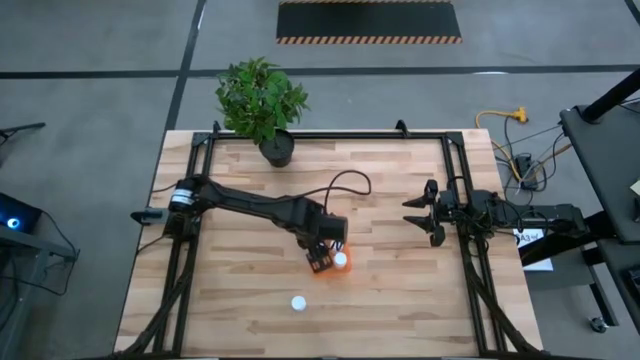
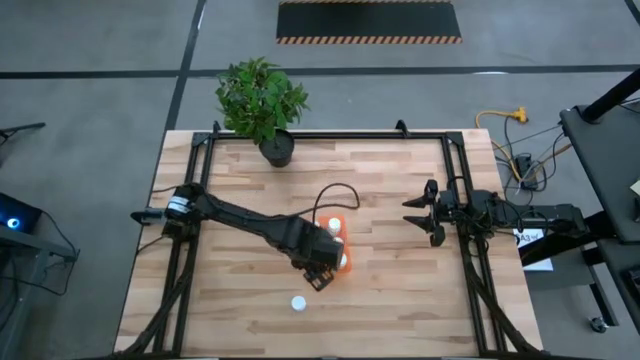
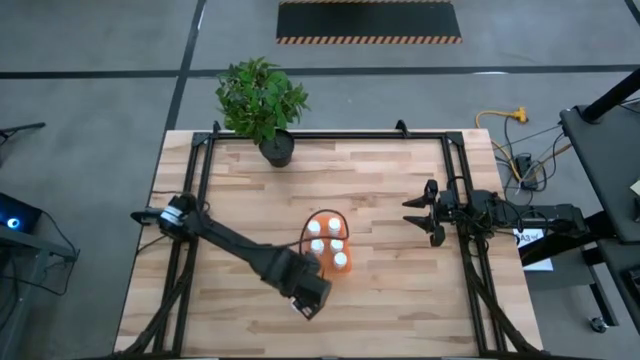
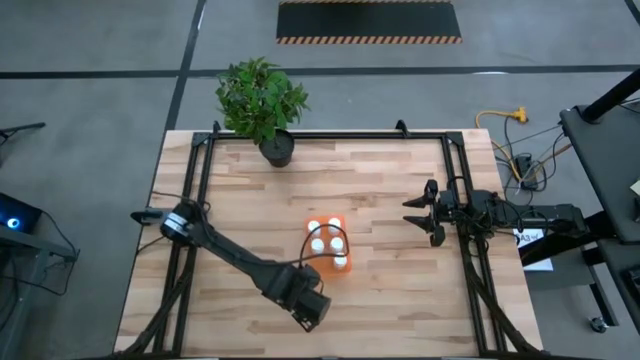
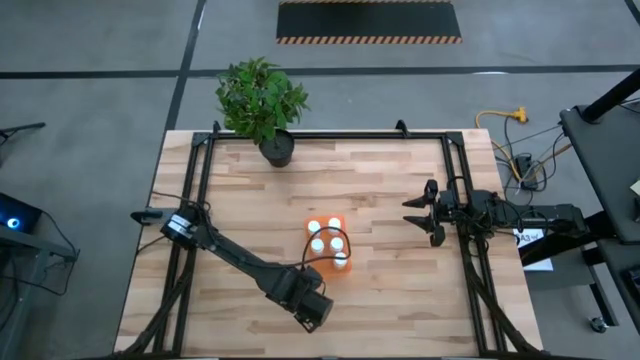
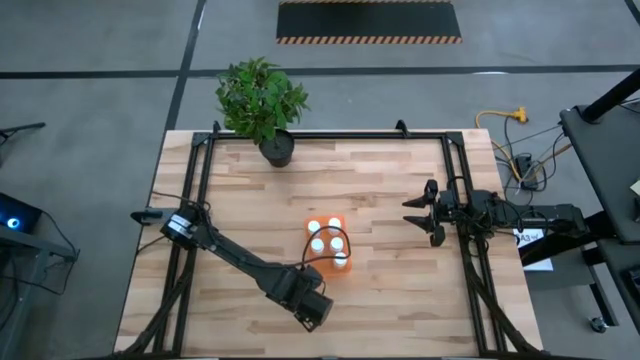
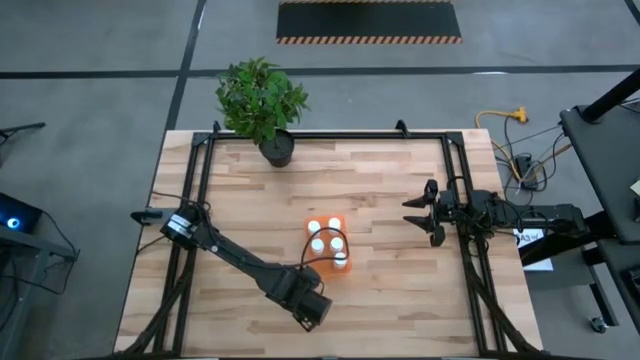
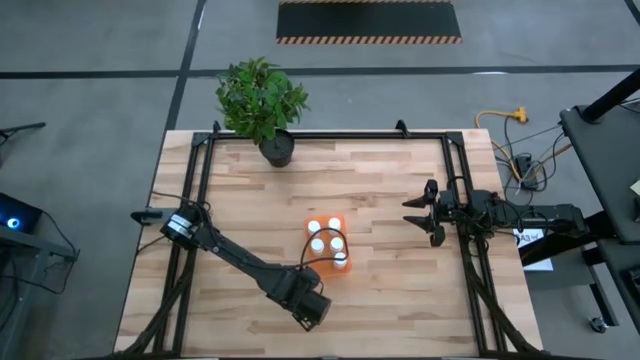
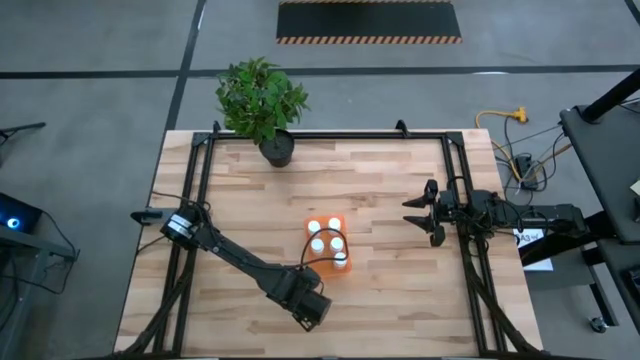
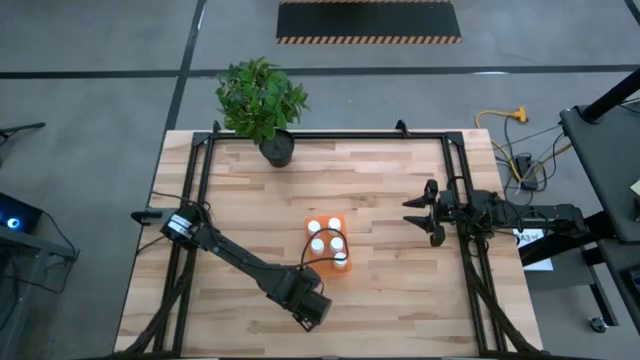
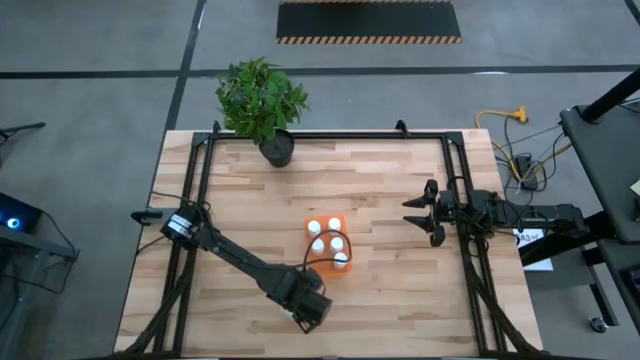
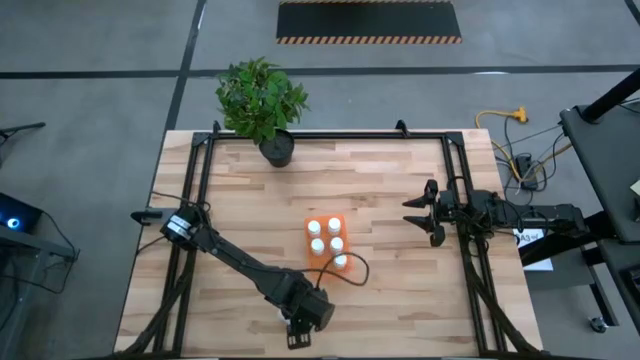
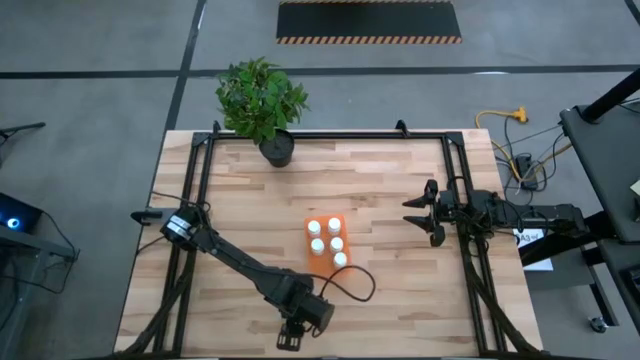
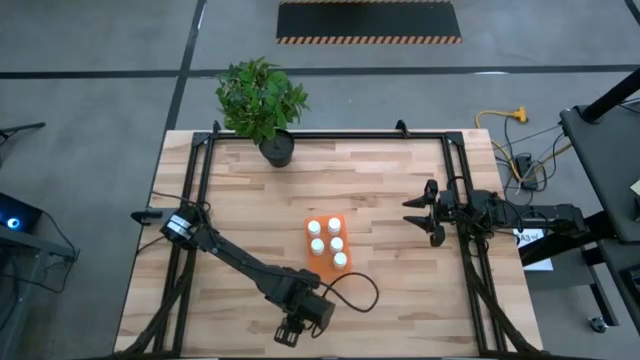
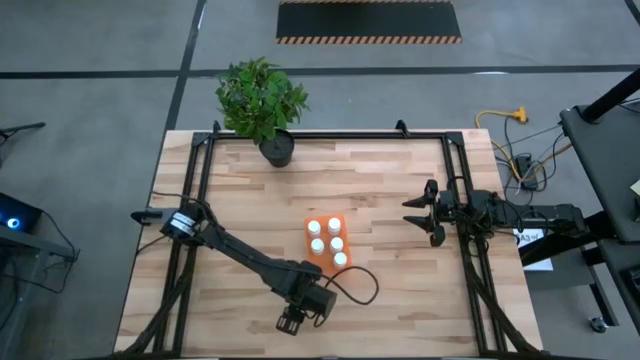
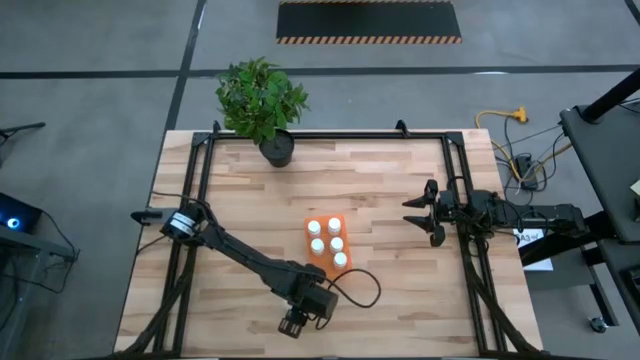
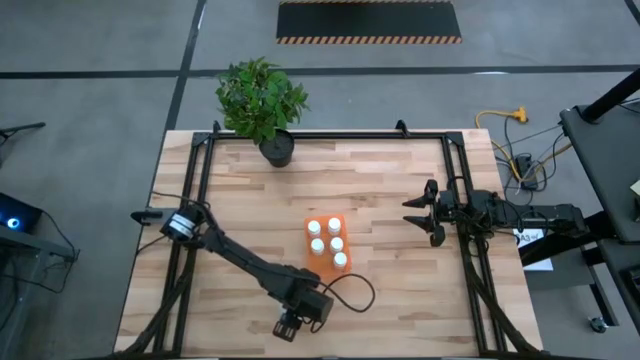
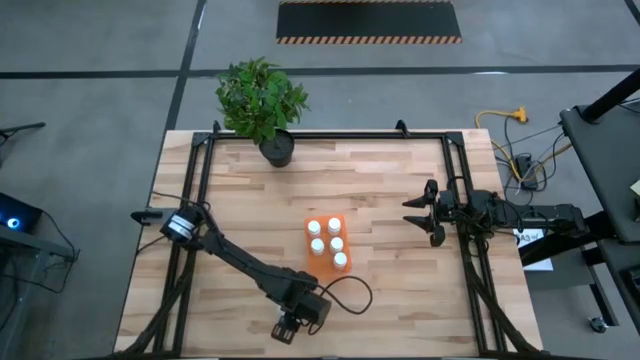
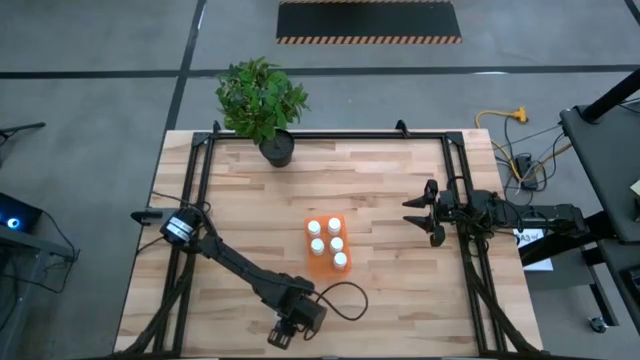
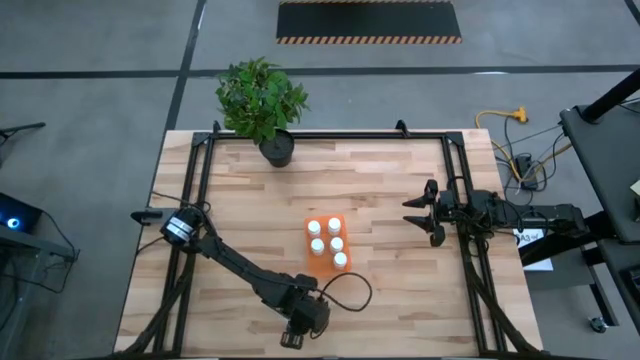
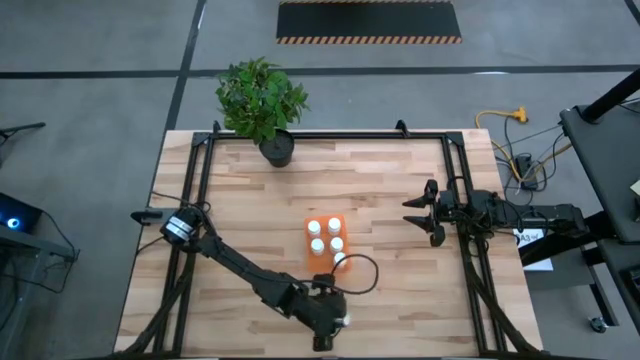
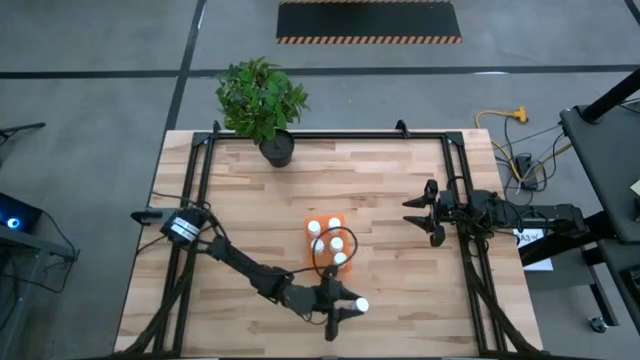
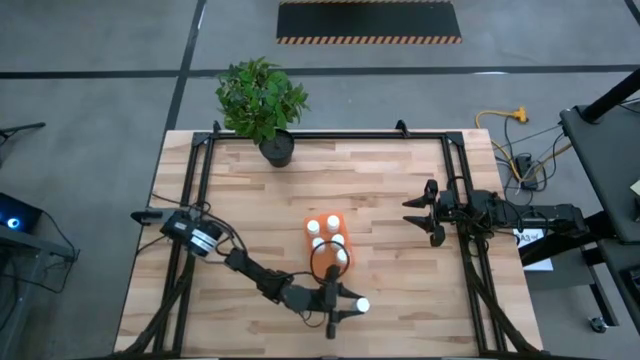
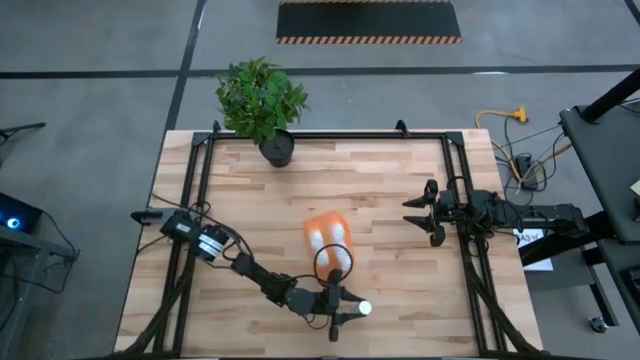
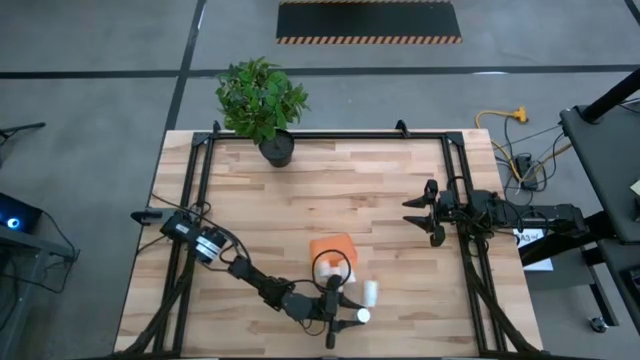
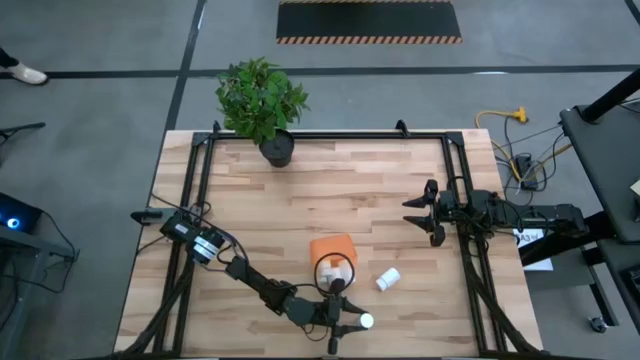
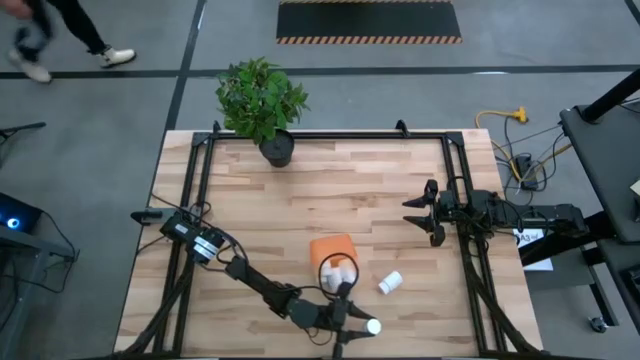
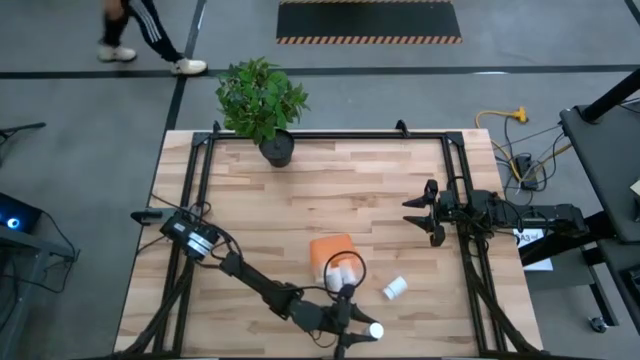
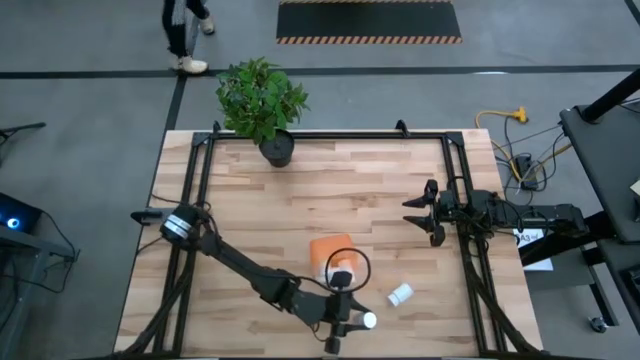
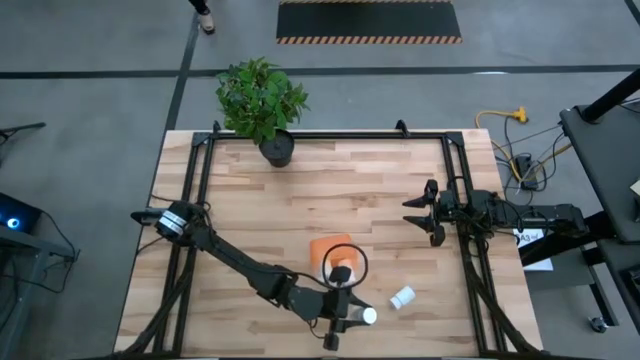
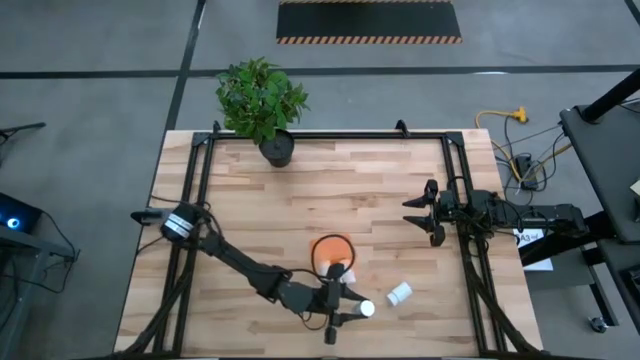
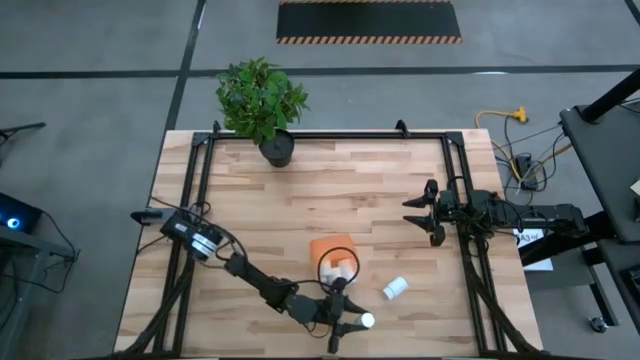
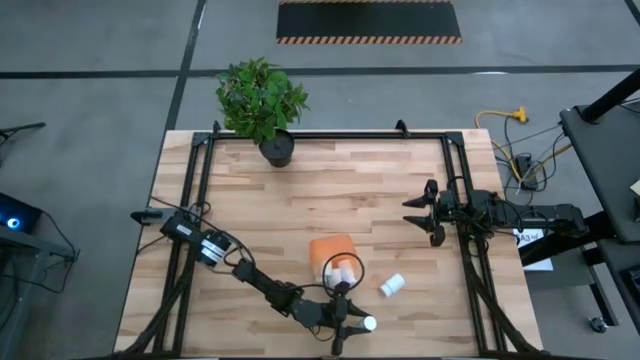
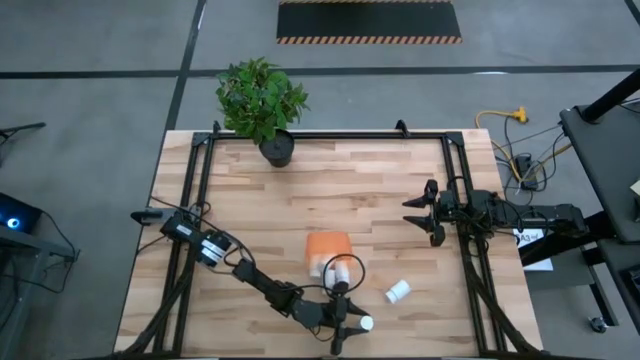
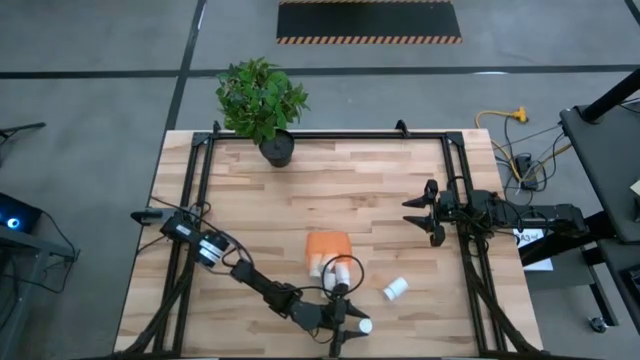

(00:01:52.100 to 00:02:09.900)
Task: Pick and place pill bottles into a basket
Put the white pill bottle into the orange container

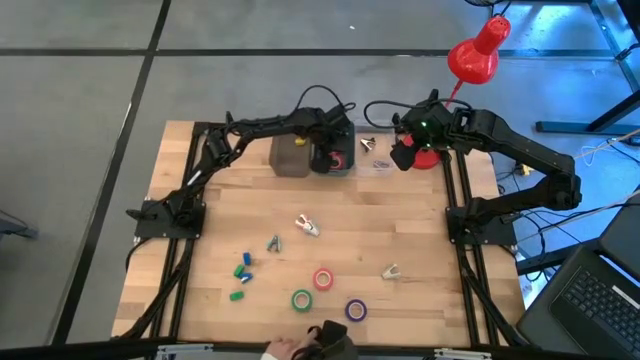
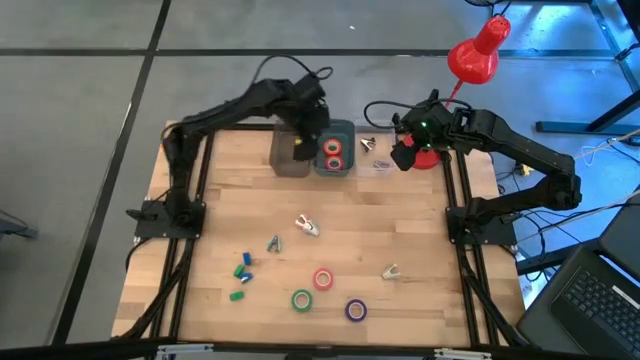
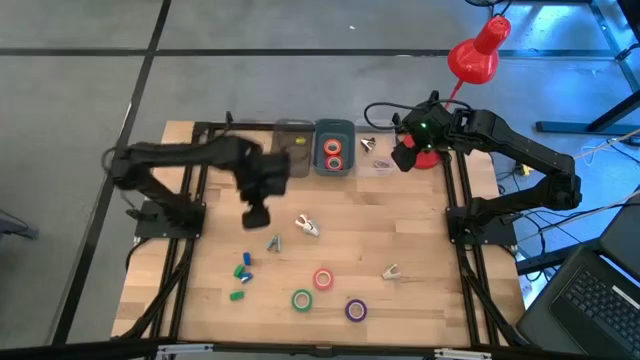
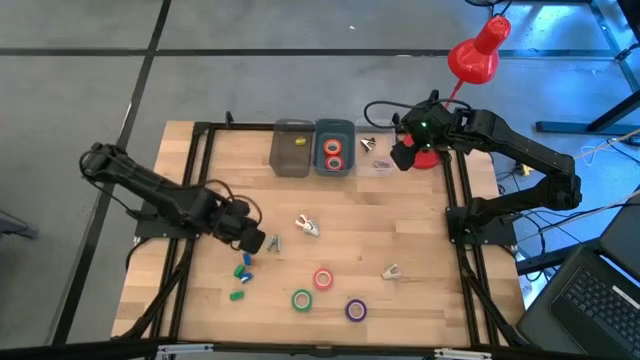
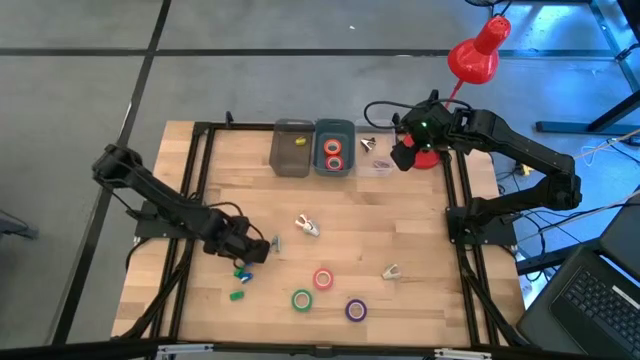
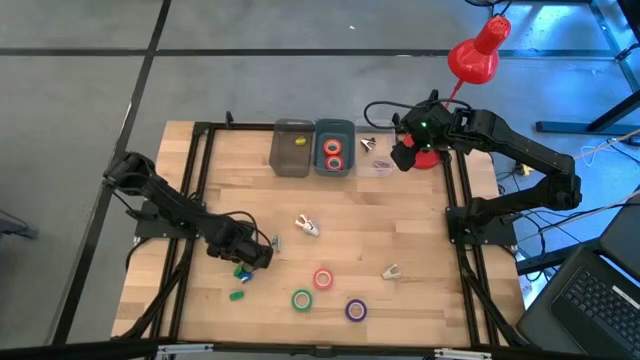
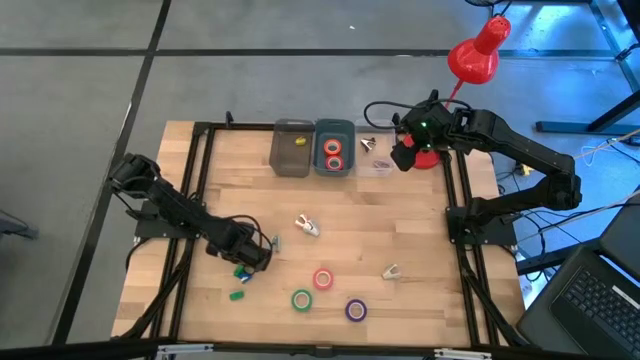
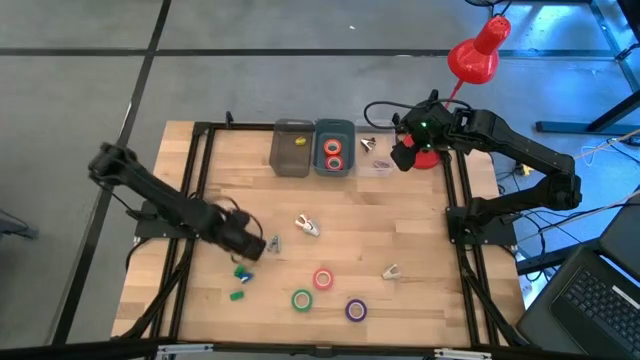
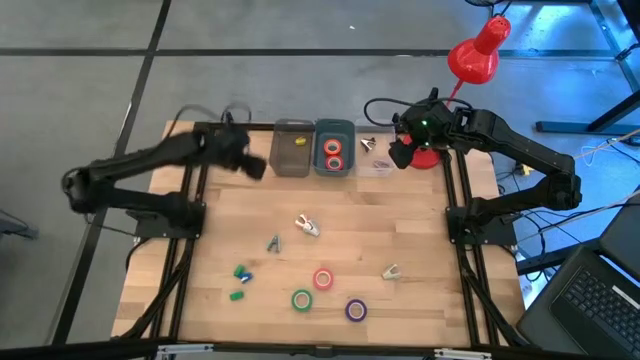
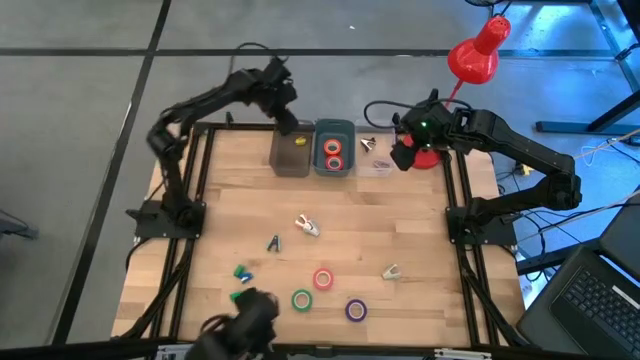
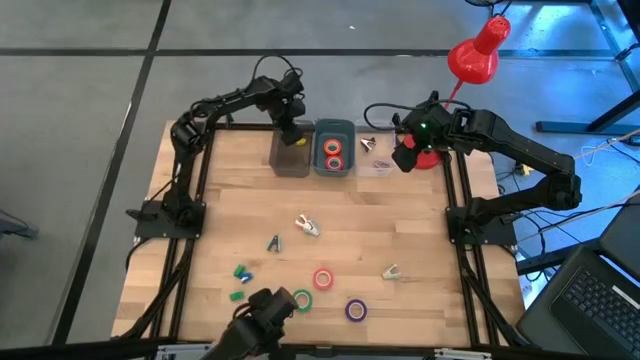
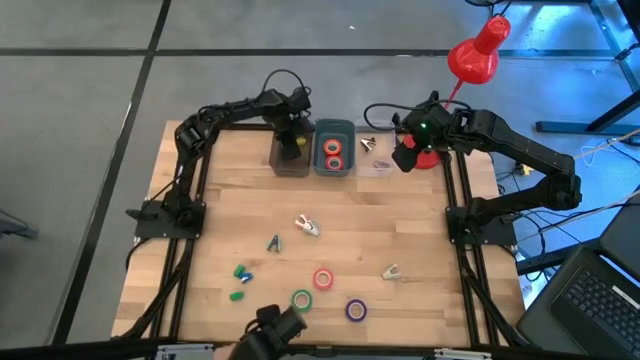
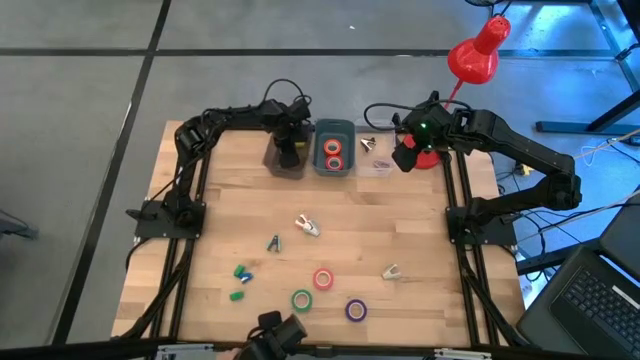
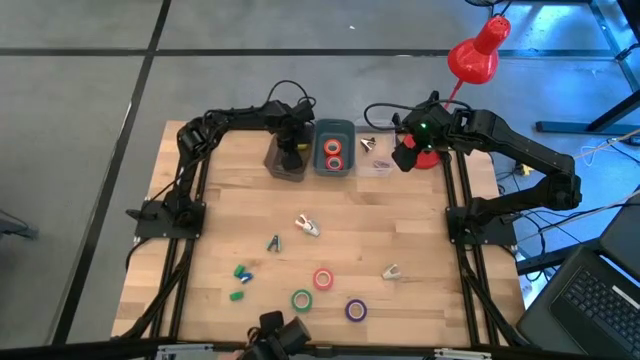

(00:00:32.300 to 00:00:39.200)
Task: Pick and place Stapler, Stapler remover, tape
Put the top blue stapler into the black bin
